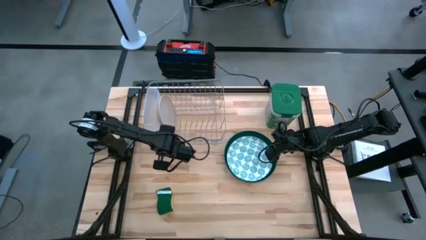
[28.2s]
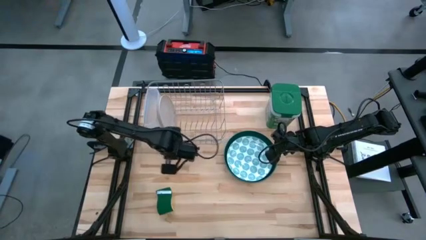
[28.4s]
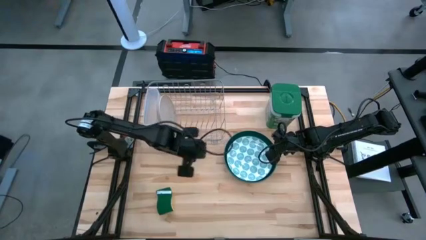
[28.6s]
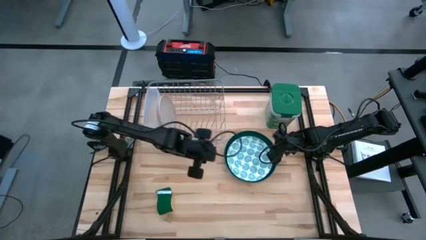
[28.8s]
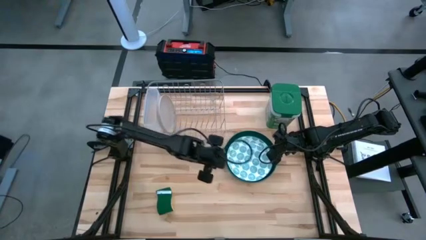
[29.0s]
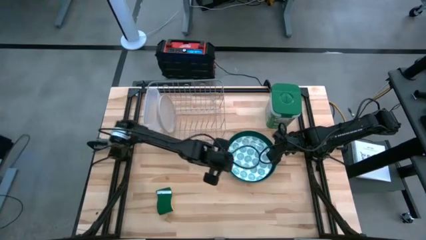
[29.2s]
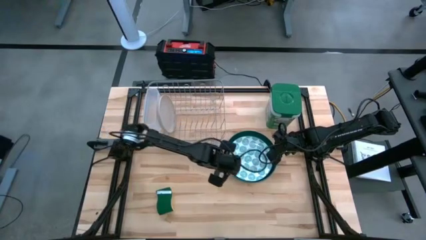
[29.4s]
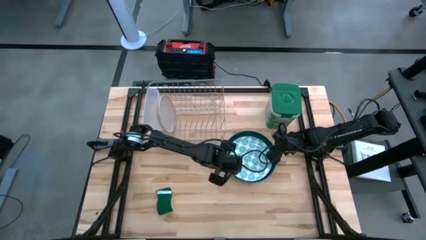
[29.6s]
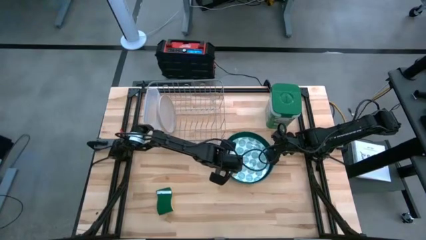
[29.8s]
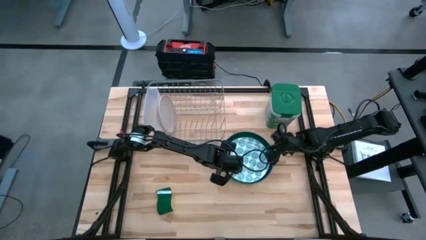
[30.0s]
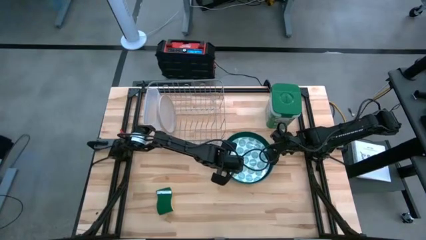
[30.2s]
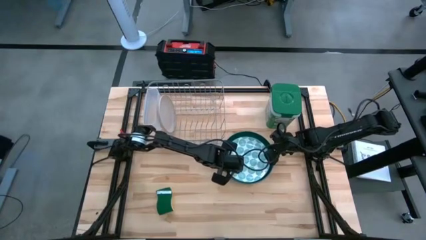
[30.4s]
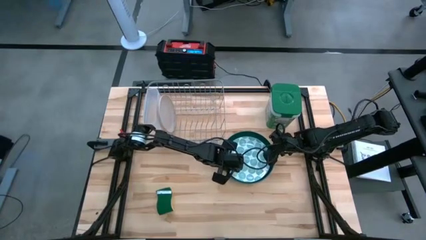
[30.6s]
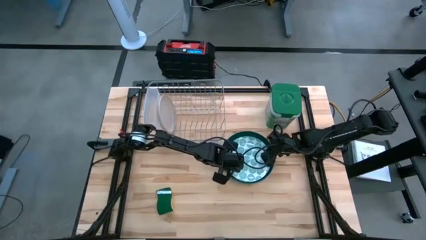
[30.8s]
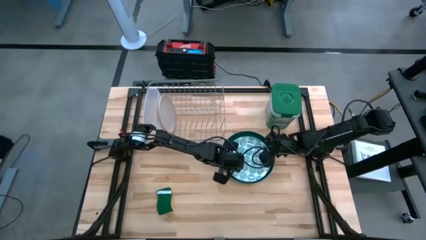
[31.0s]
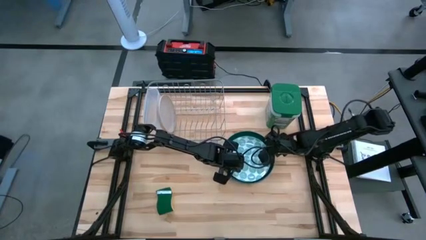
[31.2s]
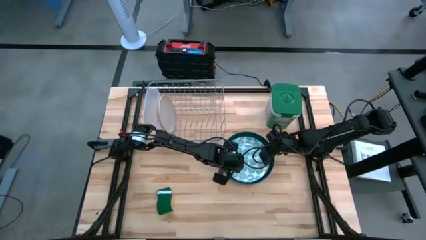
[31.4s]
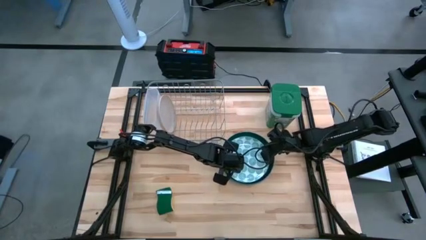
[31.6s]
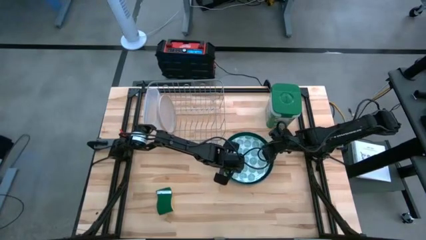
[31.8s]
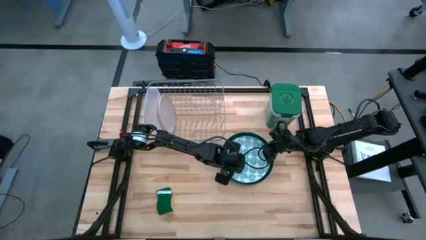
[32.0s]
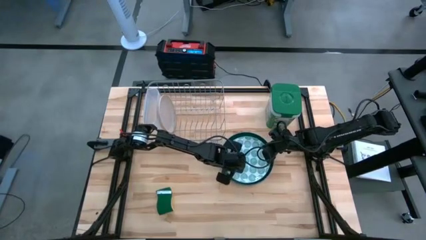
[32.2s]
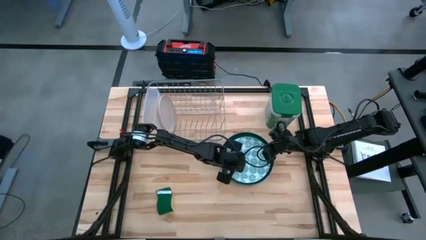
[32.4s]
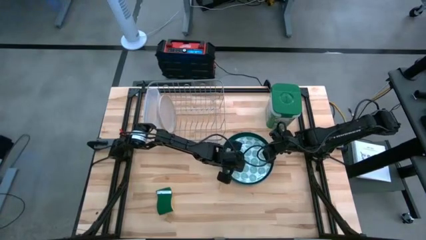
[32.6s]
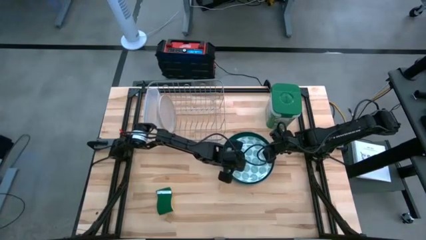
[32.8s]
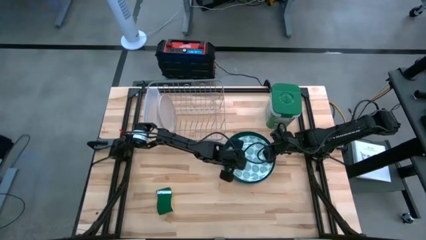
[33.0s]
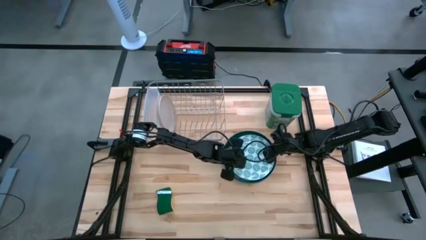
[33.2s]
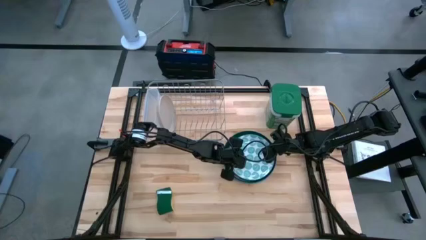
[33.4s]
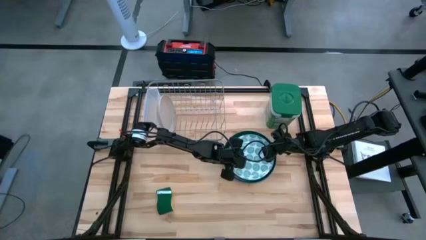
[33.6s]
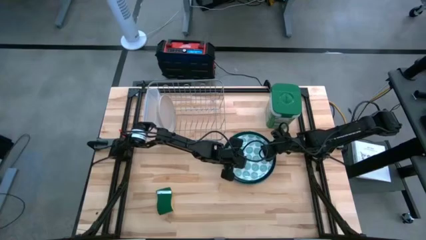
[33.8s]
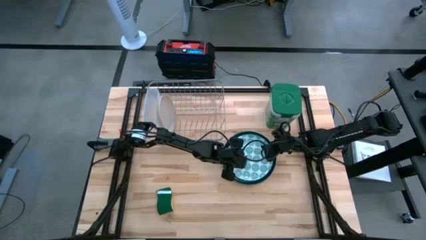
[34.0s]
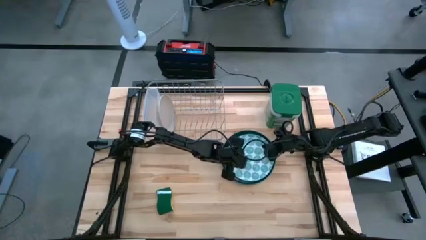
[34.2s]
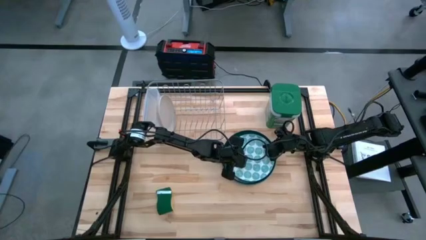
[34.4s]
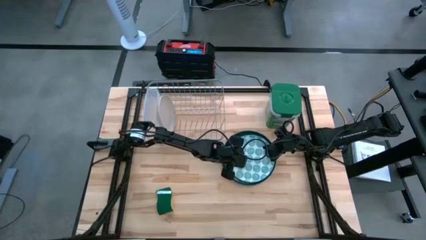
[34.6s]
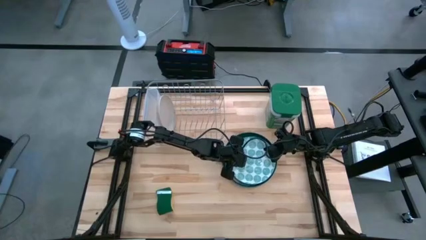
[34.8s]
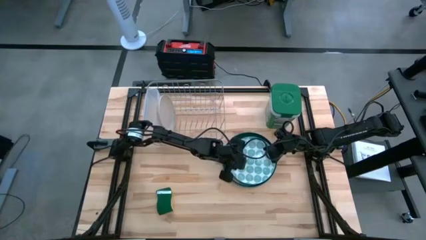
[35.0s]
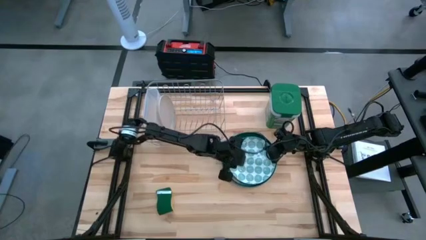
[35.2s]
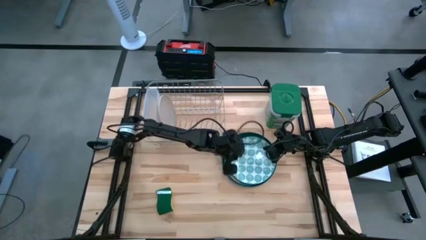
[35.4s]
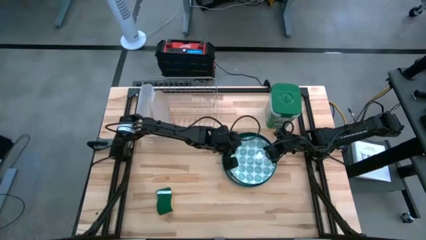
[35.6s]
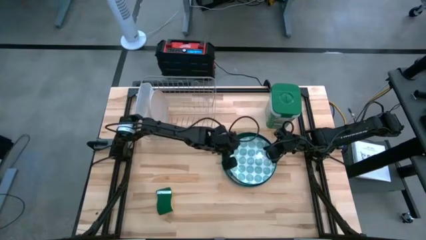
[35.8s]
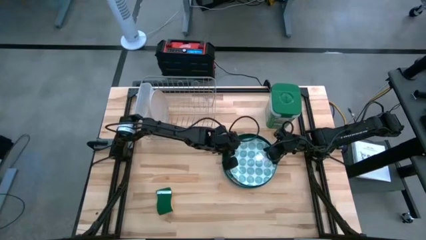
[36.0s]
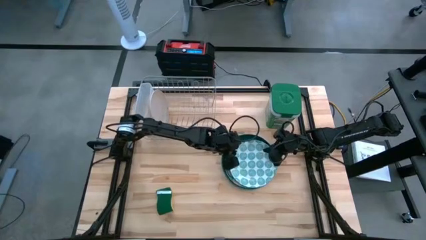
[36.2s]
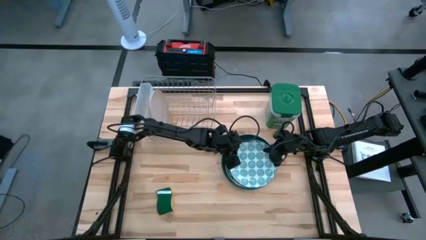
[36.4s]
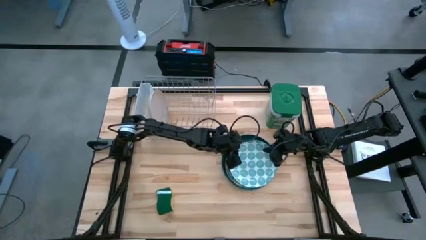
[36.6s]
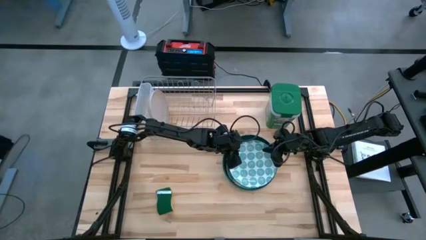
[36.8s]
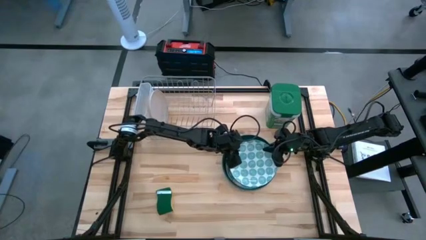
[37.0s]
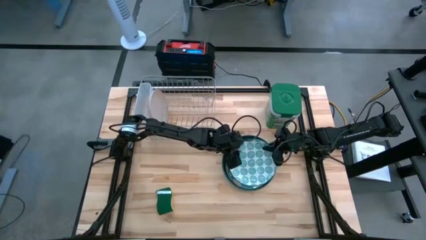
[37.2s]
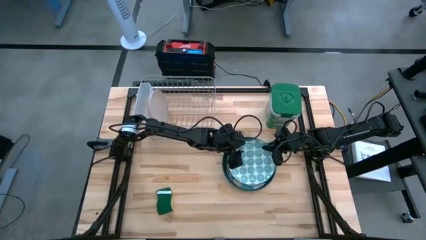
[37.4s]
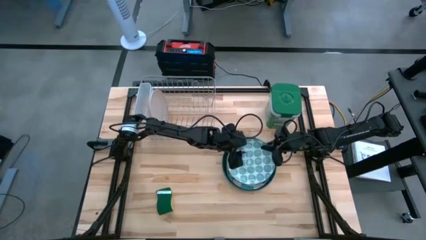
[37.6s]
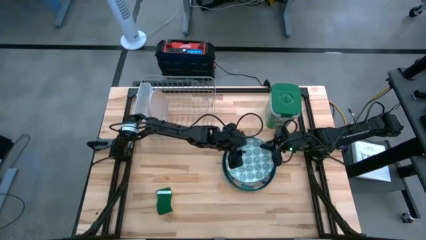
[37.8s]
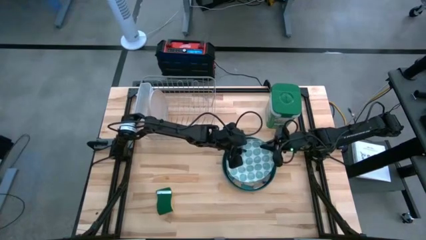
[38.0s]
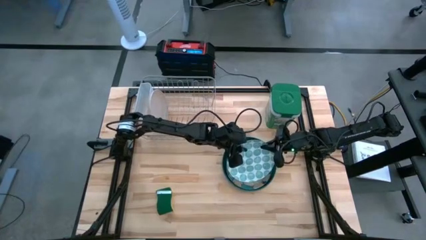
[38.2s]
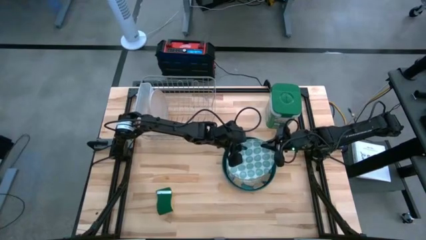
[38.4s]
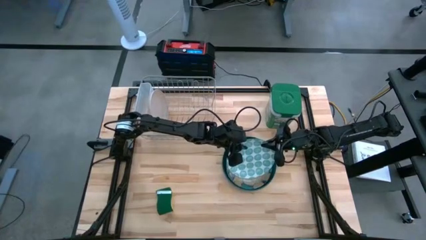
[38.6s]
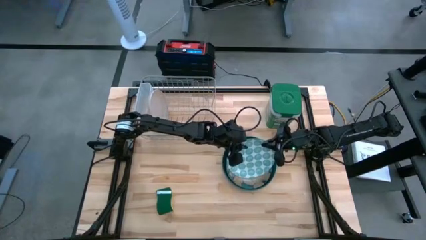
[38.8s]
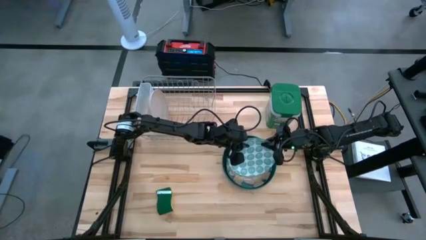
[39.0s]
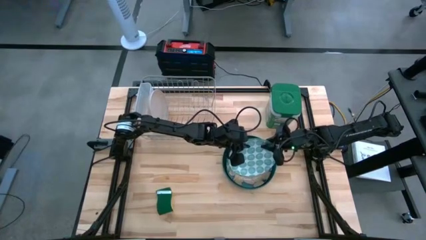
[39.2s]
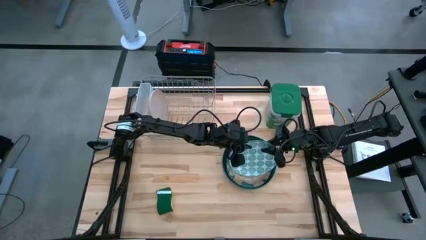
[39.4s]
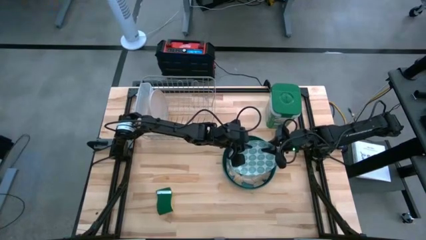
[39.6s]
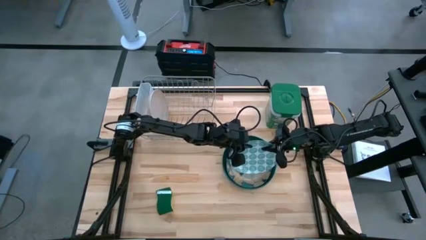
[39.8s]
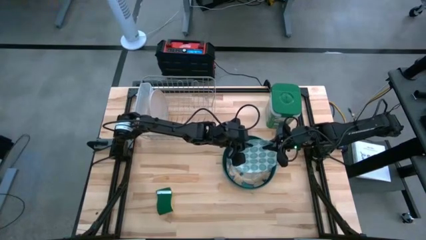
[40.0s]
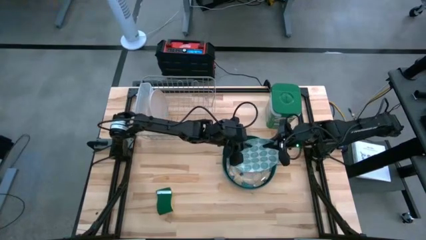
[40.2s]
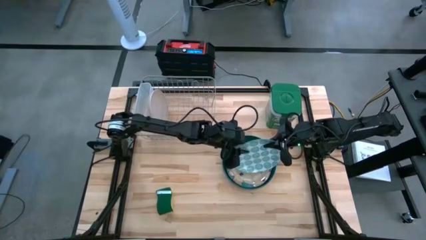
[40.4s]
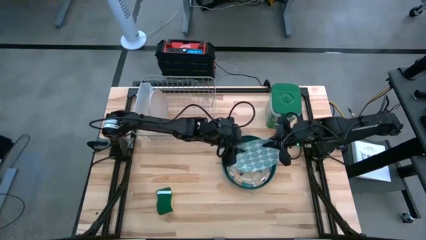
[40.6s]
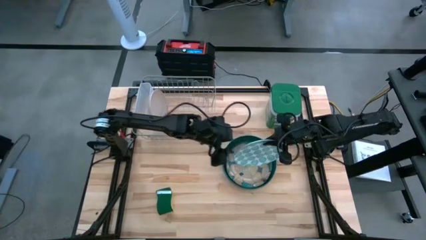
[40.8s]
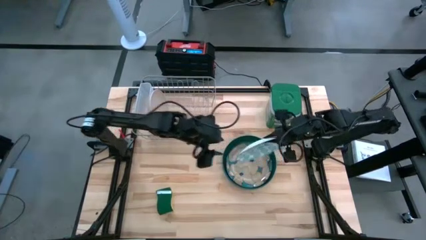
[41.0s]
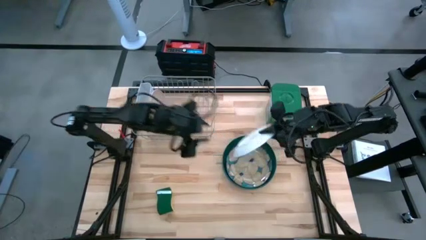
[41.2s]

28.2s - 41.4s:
Task: Sort dishes
Put the blue patterned plate on the dish rack

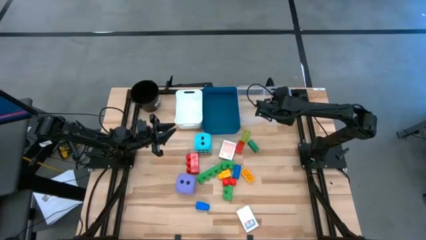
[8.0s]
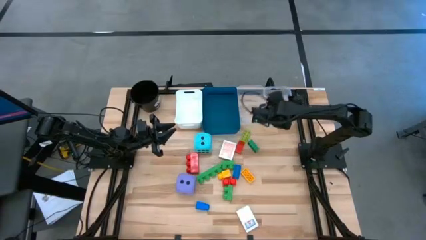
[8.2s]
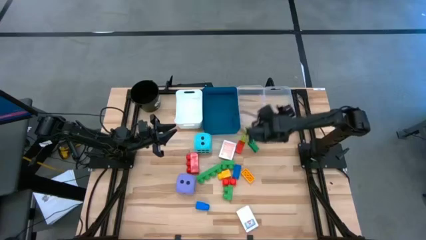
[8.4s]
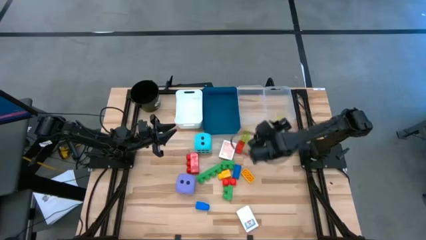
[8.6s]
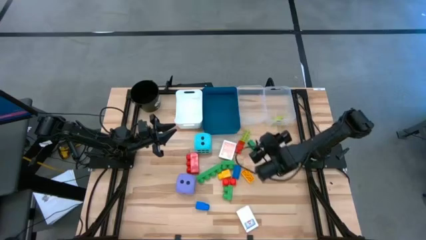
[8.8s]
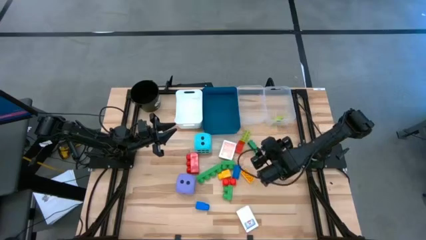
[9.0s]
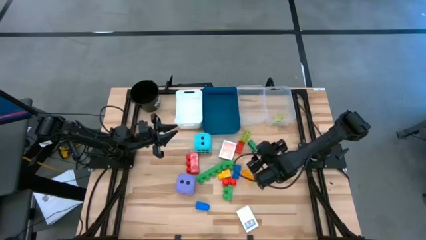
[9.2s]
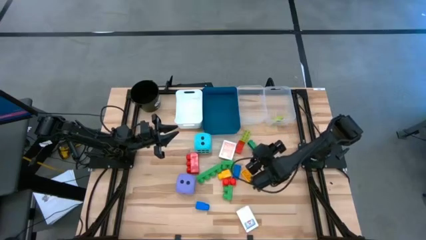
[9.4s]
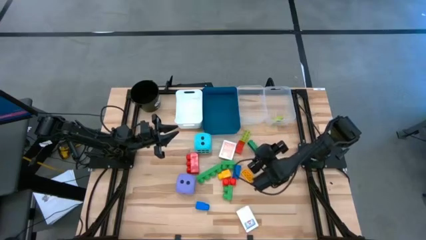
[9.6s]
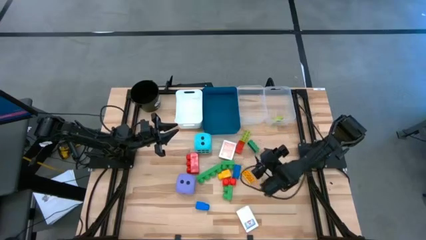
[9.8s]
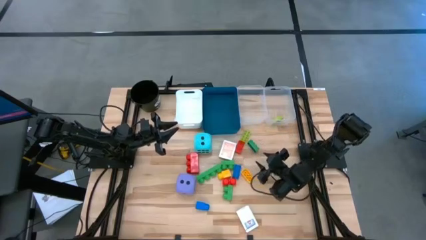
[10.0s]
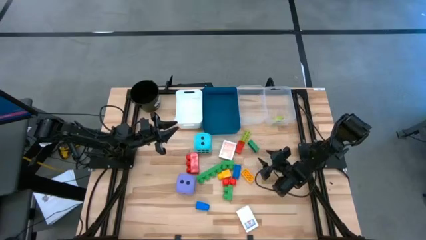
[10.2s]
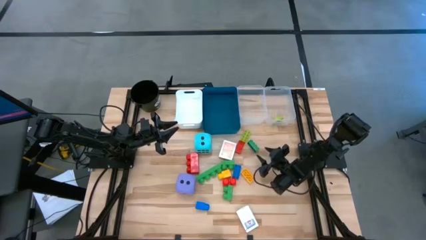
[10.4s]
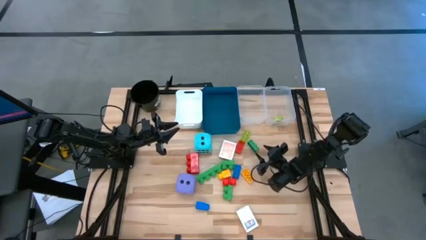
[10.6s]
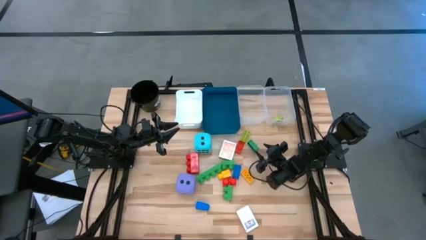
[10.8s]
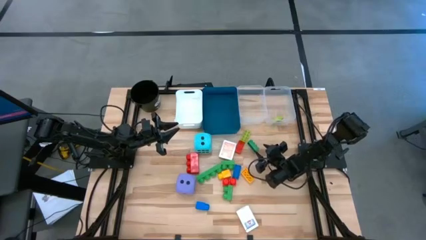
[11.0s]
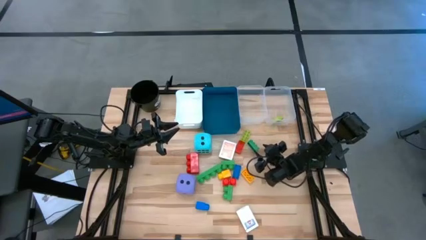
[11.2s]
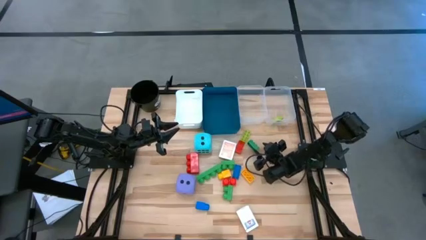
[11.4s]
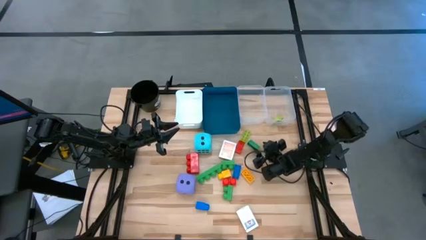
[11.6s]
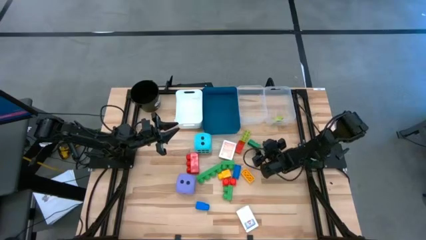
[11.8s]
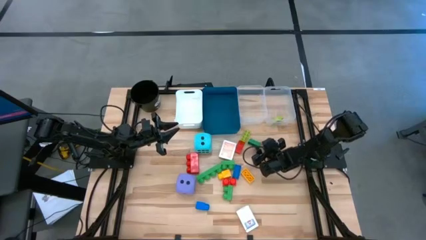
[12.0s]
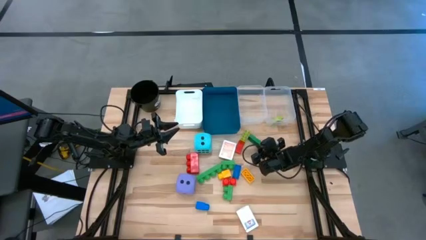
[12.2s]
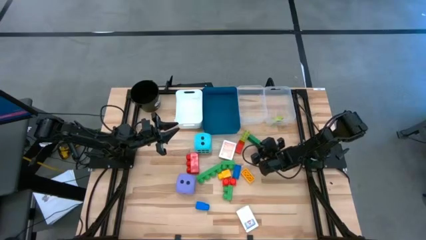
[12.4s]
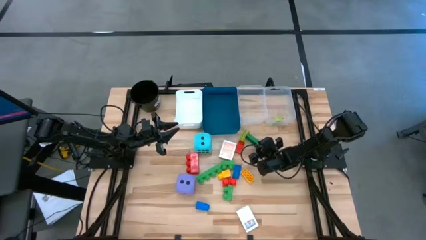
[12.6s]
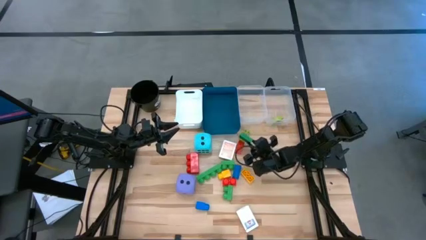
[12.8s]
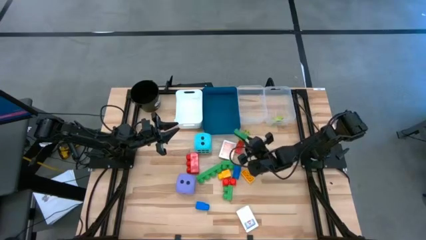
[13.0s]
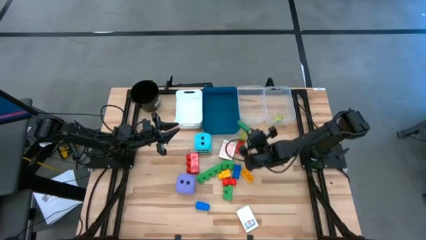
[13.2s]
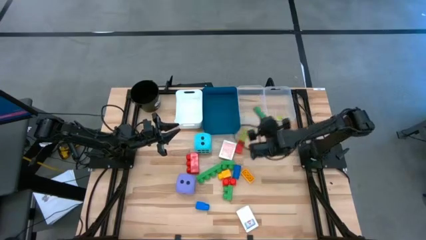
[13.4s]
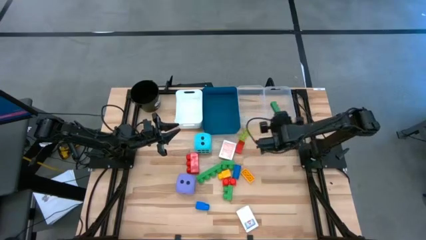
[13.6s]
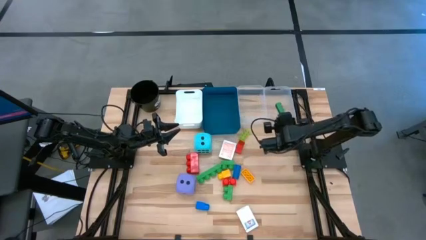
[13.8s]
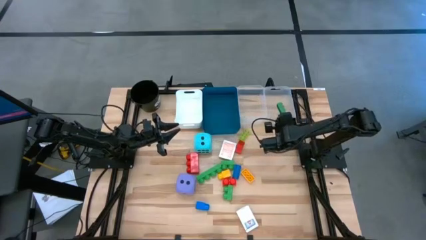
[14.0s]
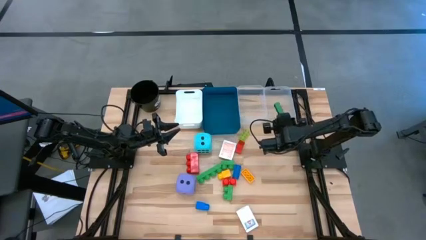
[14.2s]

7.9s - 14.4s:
Task: Pick & Place Toys
Put the small green game piece into the right transparent bin
